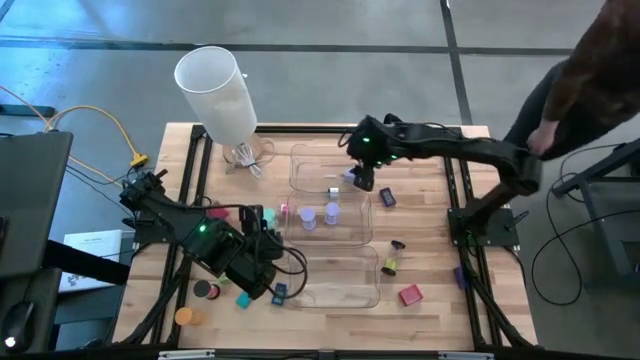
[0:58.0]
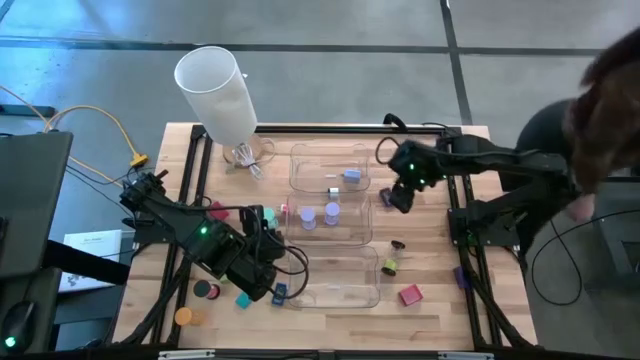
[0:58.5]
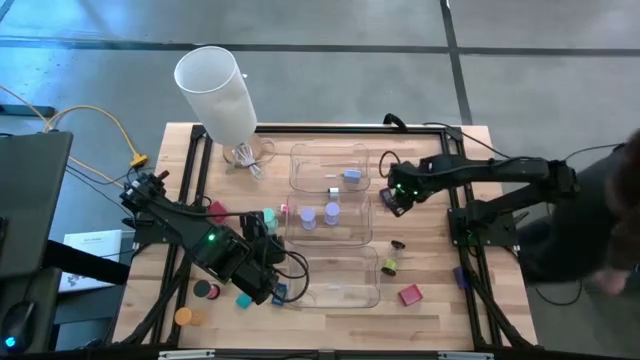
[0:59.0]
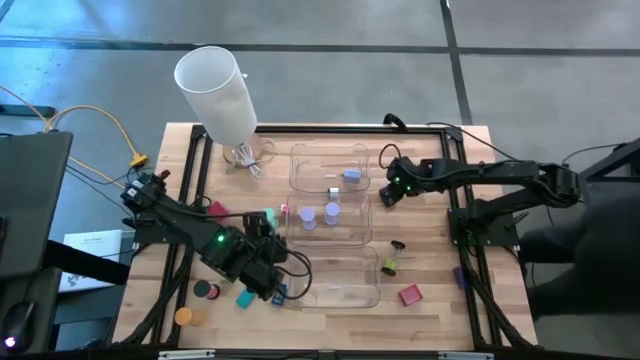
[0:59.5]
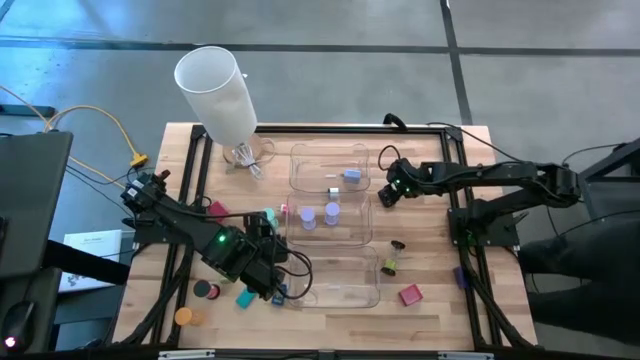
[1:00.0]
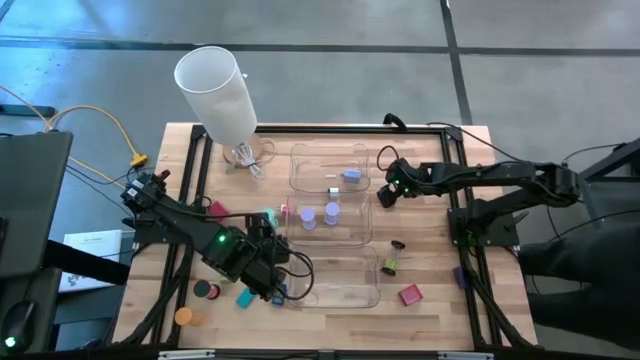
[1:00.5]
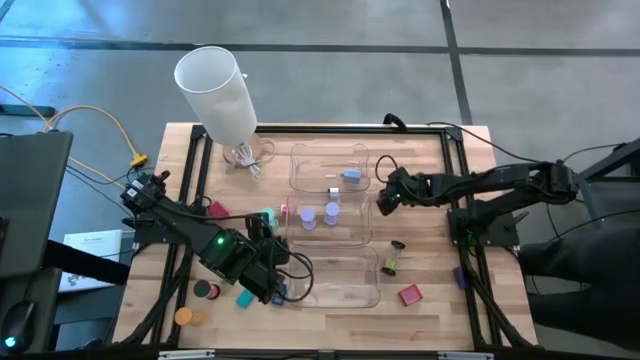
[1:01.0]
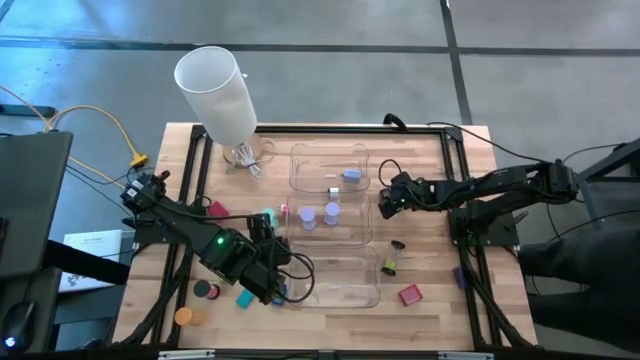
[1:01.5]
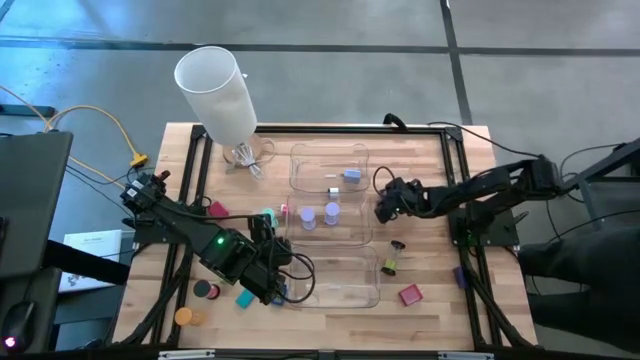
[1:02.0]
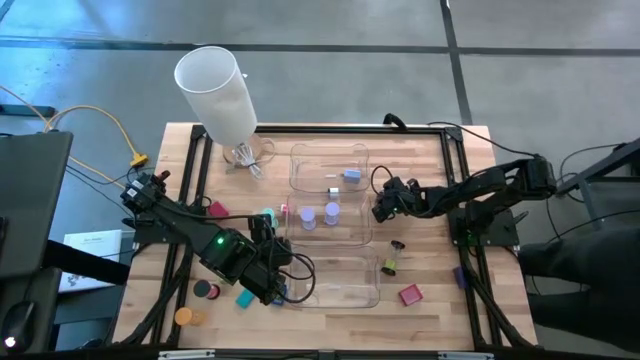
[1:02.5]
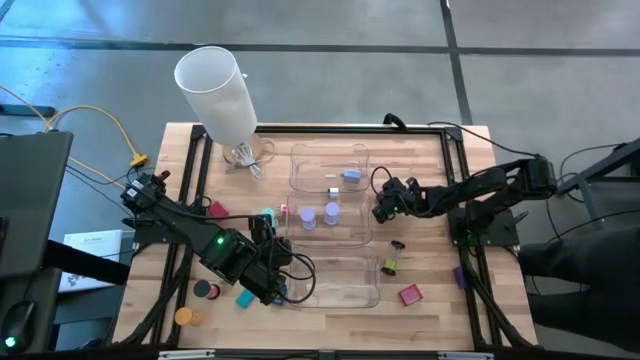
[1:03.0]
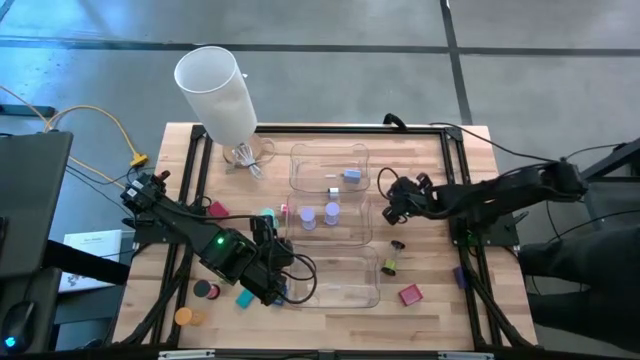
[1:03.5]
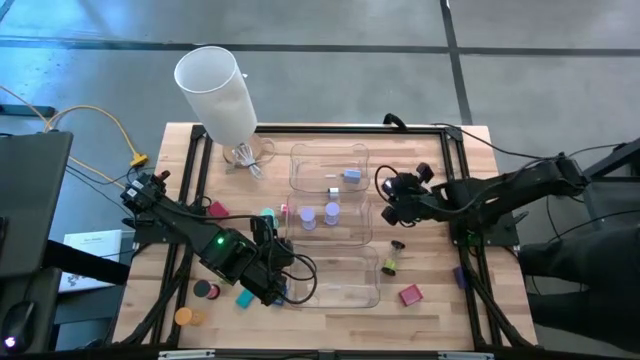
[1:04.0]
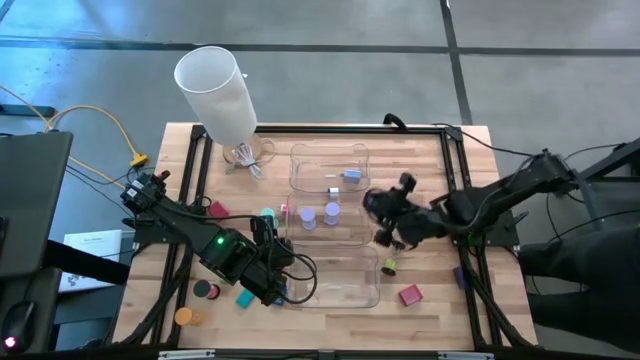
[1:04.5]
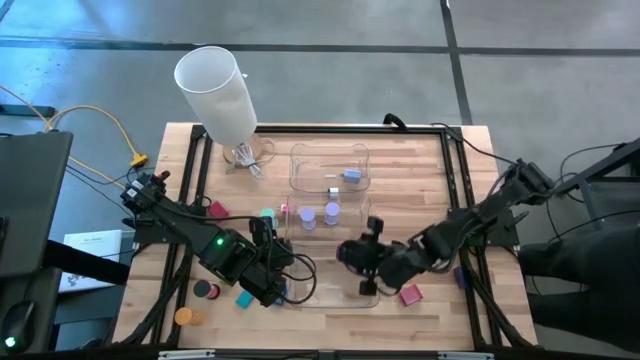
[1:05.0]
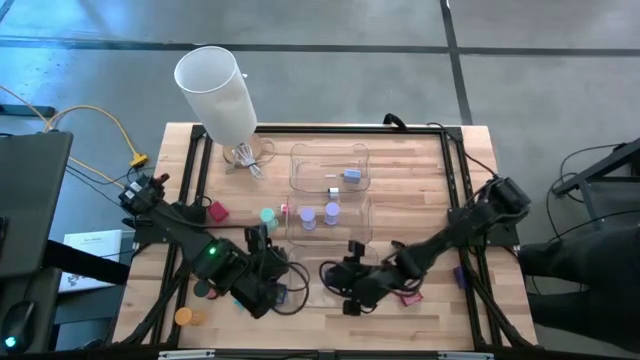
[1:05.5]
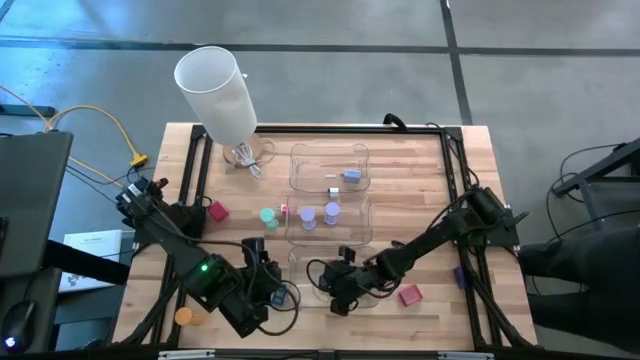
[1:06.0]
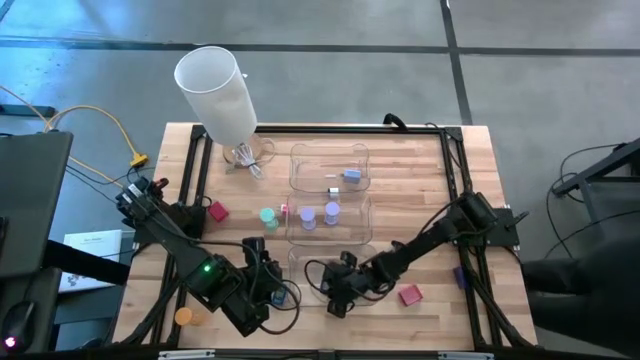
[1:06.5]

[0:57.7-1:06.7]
Task: Pick & Place Office items
Put the top right dark blue digital clock into the bottom transparent bin

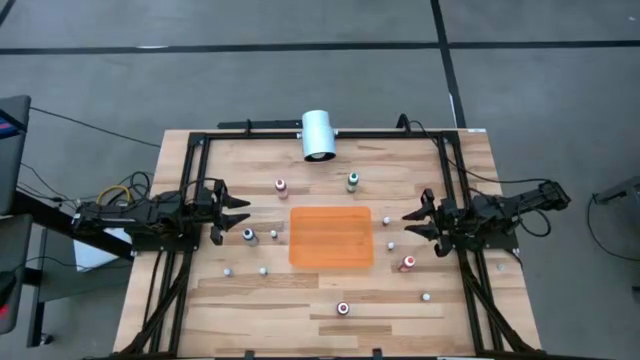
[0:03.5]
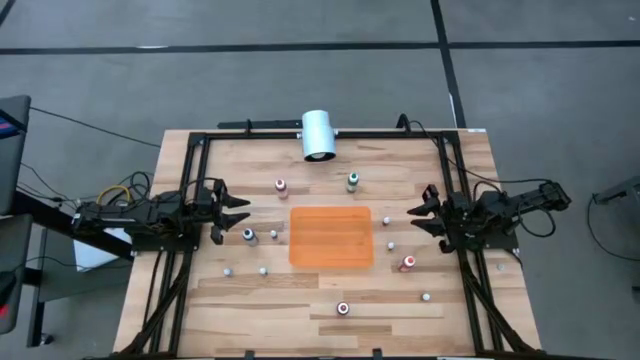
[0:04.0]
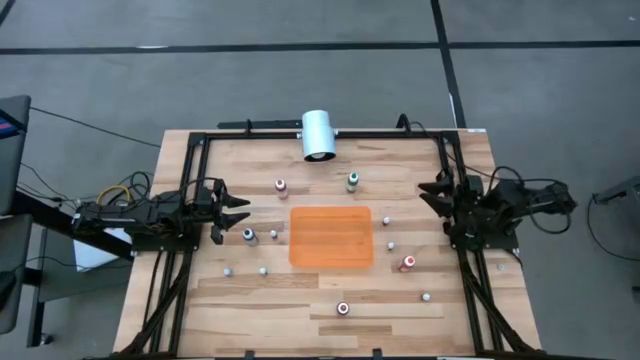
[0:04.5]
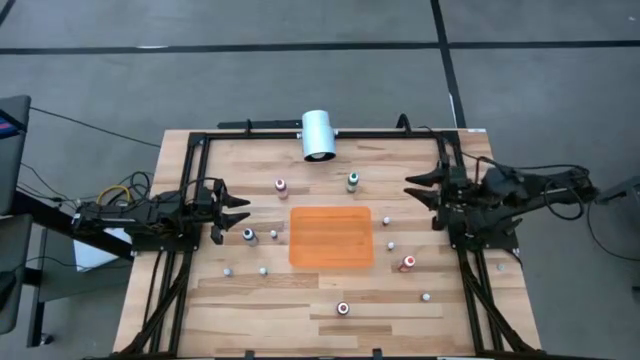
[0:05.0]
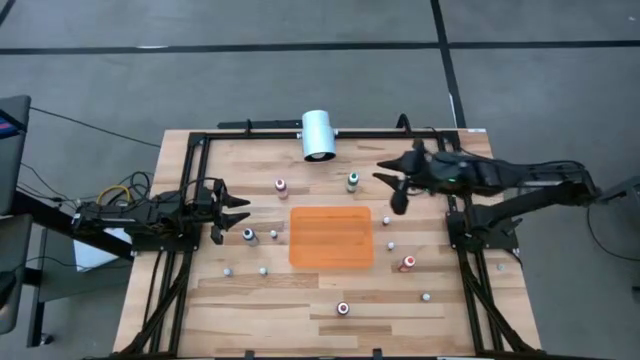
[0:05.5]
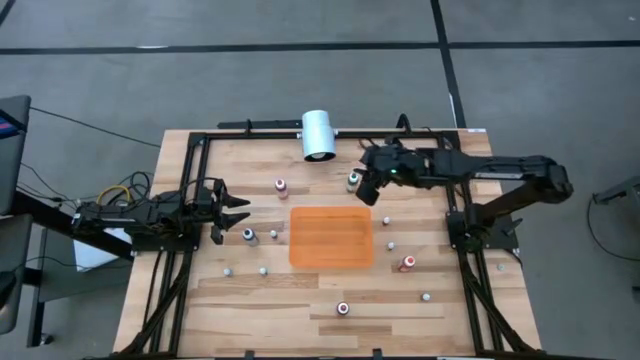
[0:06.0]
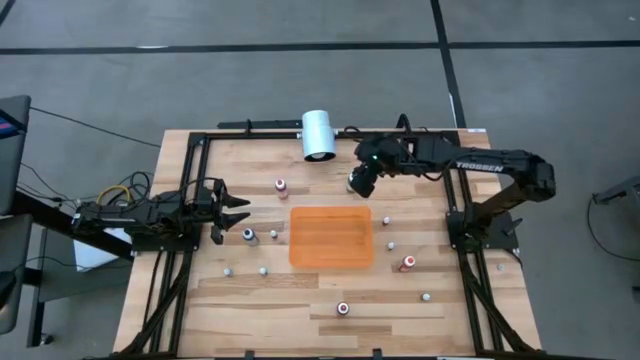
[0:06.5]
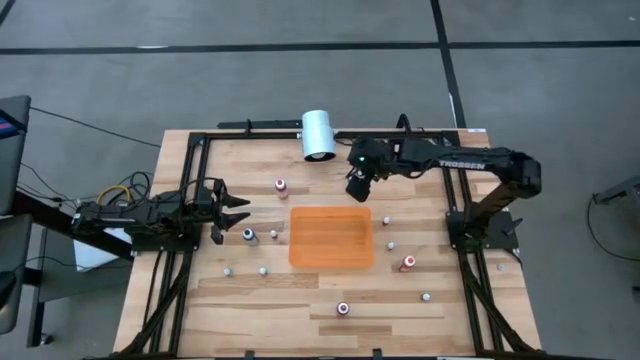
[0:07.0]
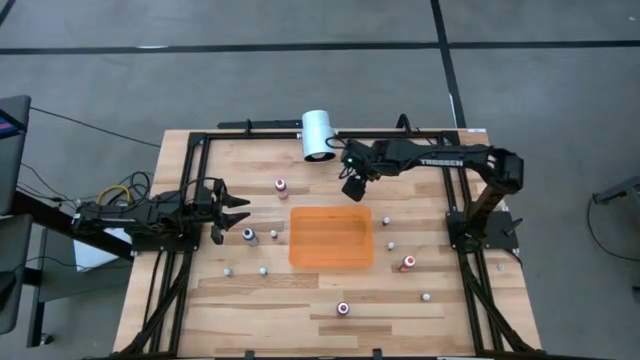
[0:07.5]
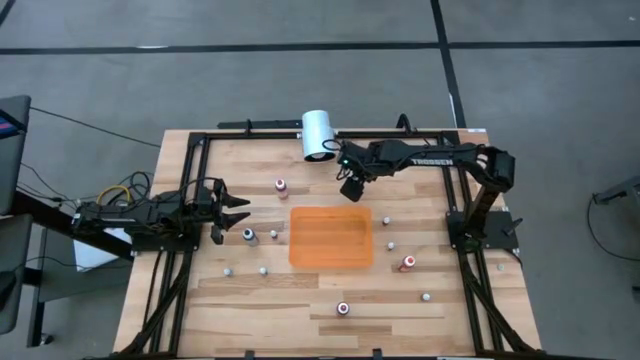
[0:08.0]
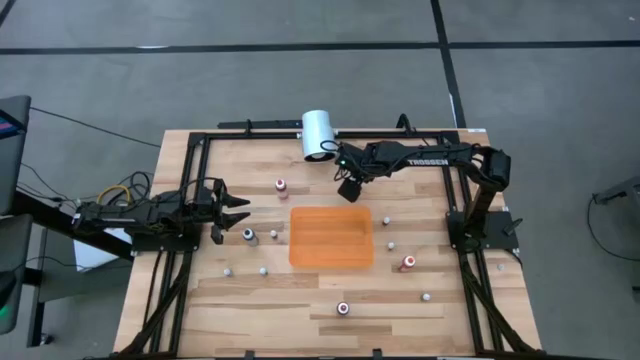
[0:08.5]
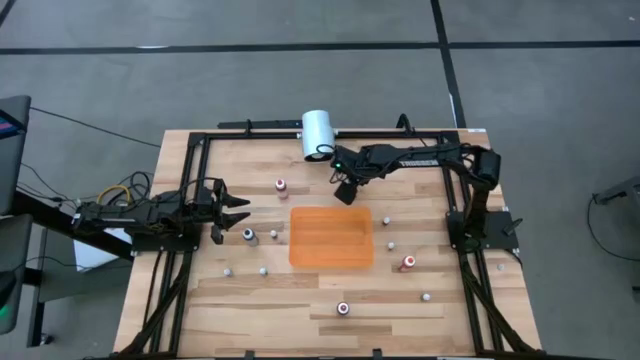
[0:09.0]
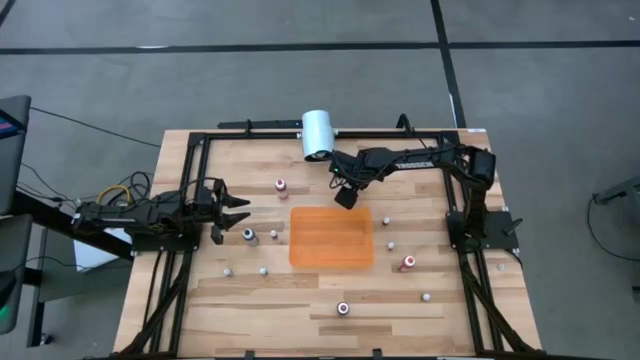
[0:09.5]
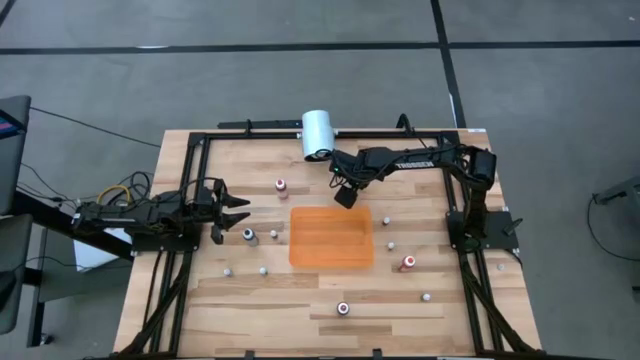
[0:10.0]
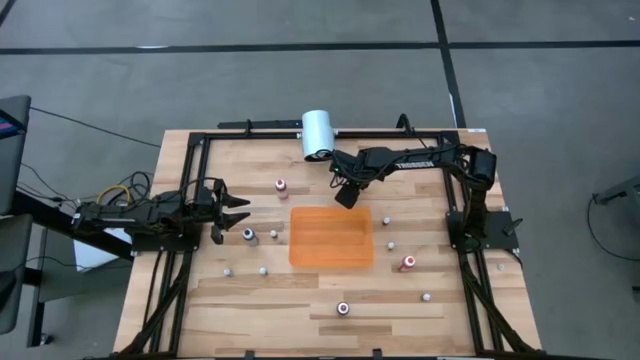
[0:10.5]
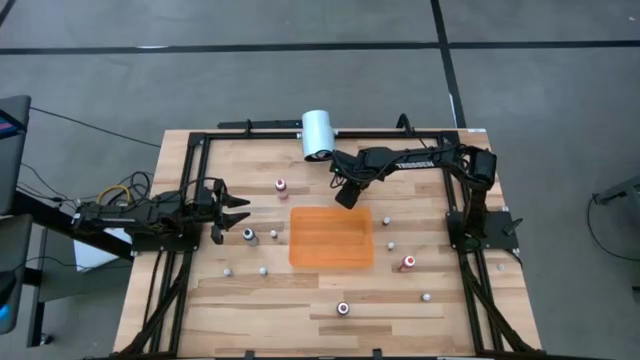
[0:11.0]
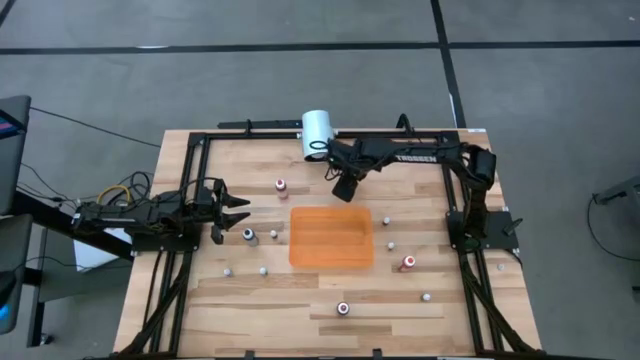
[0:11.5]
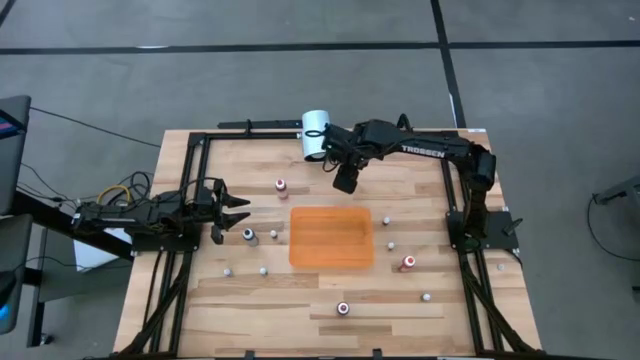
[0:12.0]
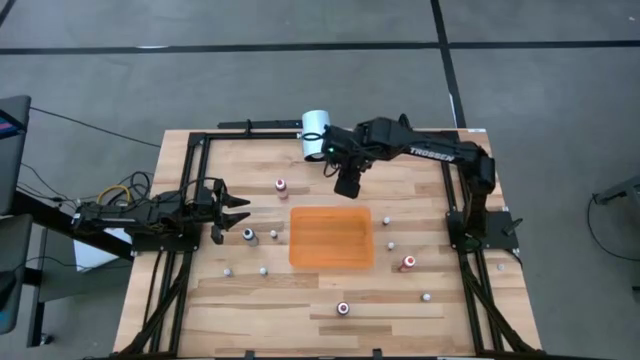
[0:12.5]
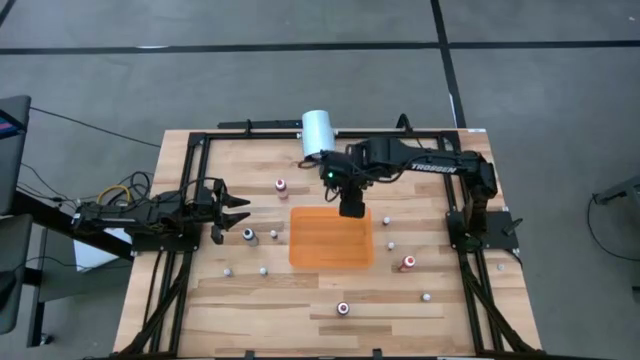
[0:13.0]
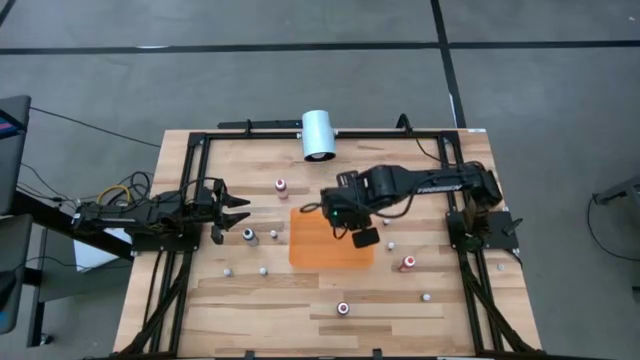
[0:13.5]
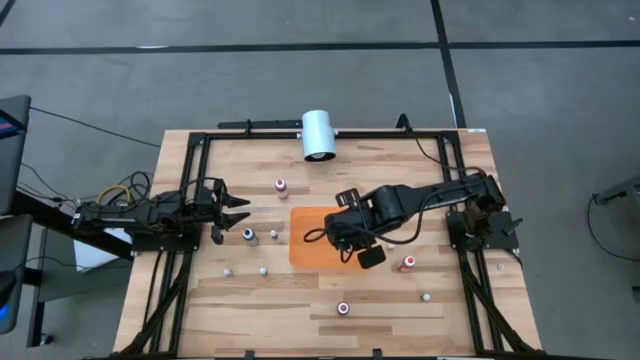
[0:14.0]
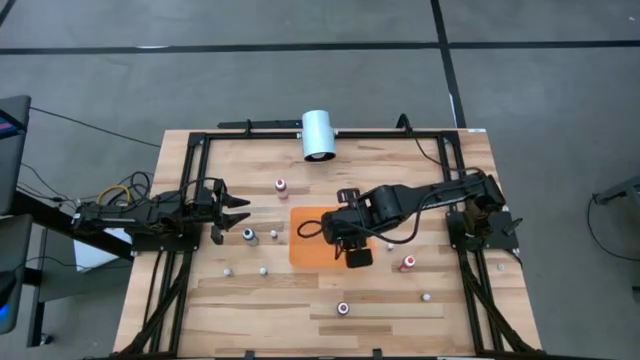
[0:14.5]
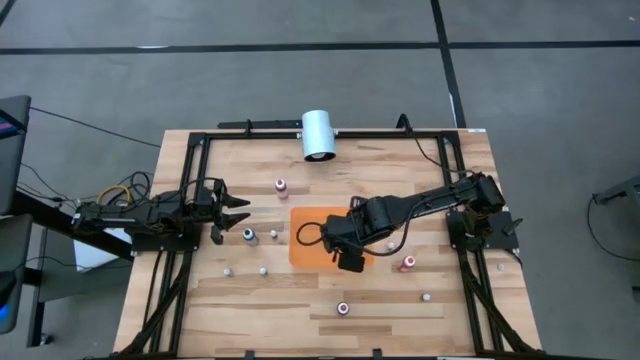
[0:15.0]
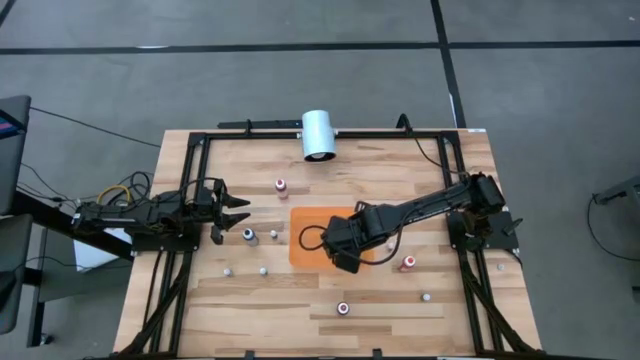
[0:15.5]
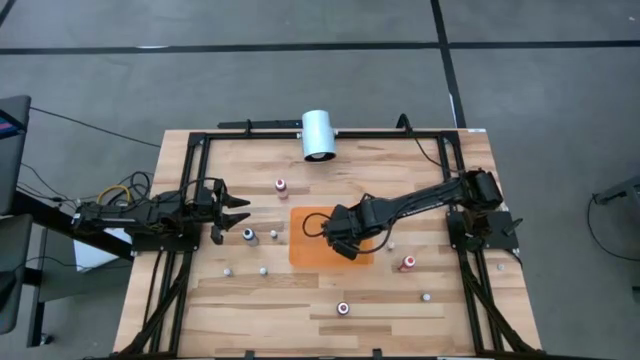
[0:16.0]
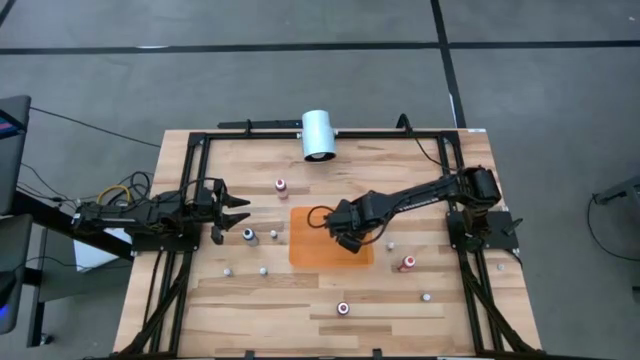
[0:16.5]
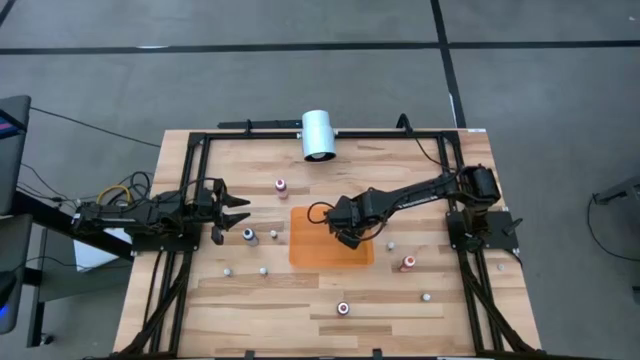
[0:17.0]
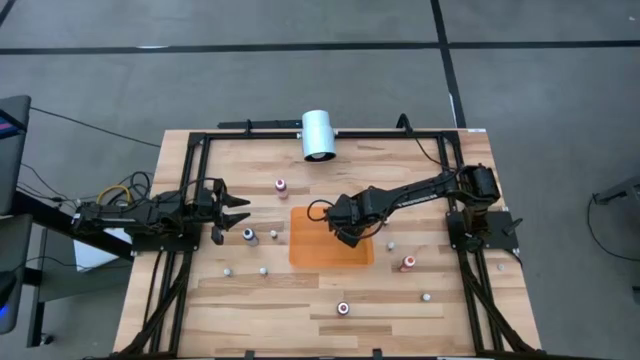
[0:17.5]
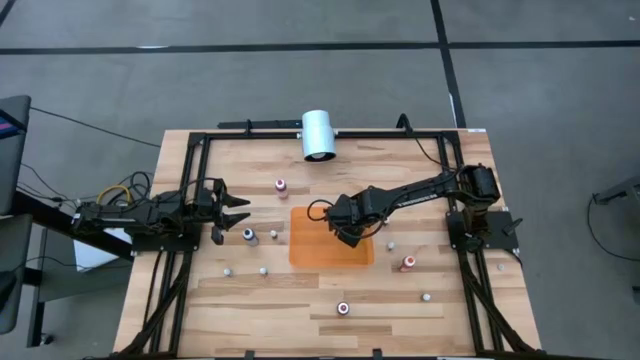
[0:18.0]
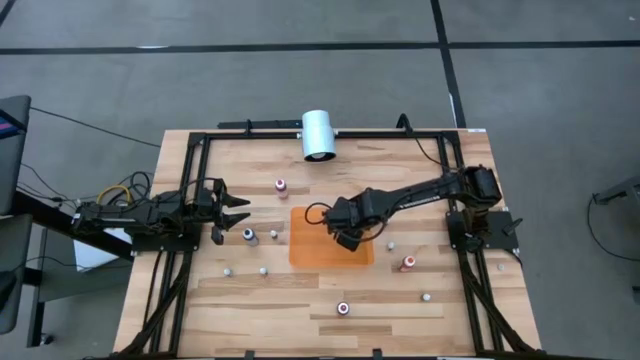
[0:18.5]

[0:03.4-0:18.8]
Task: Pick & Place food coloring
Put the large green food coloring into the orange bin
